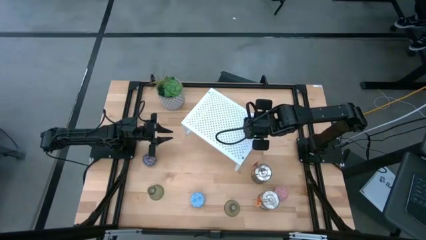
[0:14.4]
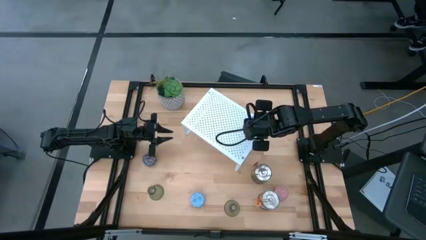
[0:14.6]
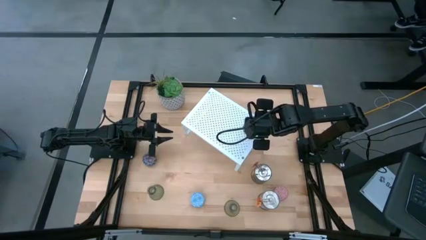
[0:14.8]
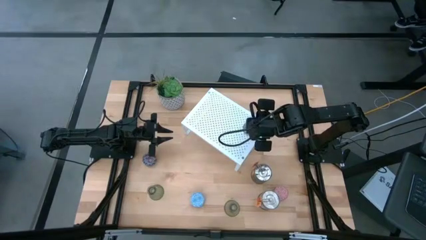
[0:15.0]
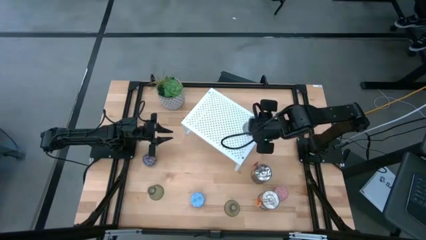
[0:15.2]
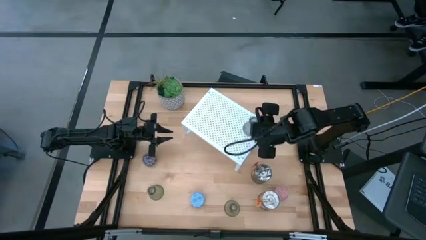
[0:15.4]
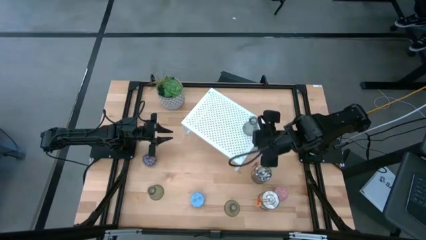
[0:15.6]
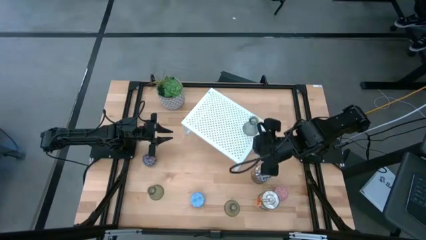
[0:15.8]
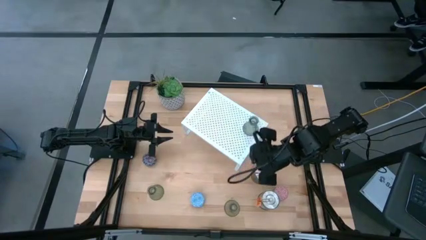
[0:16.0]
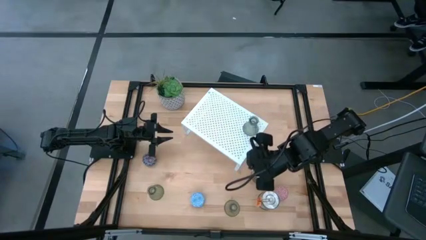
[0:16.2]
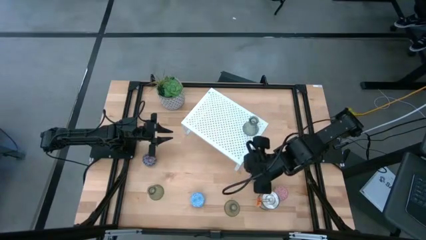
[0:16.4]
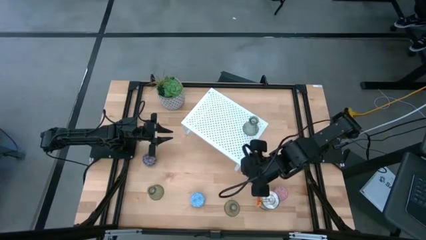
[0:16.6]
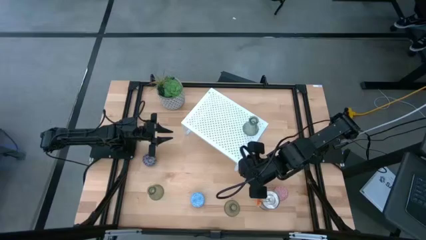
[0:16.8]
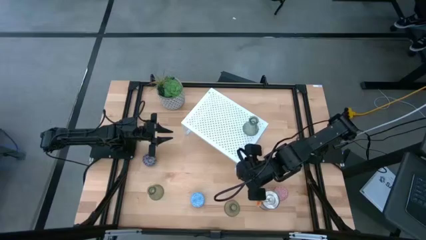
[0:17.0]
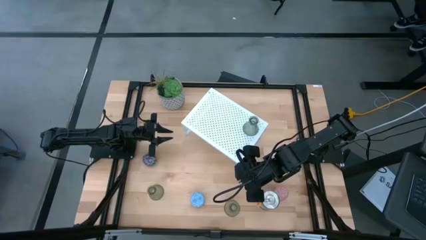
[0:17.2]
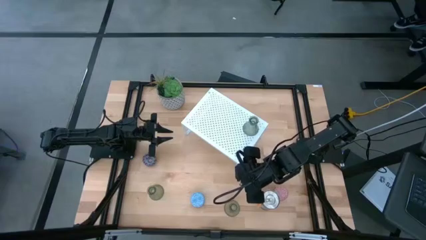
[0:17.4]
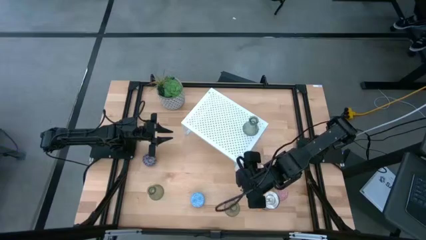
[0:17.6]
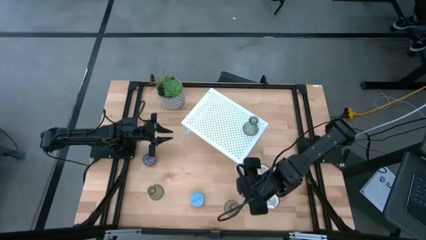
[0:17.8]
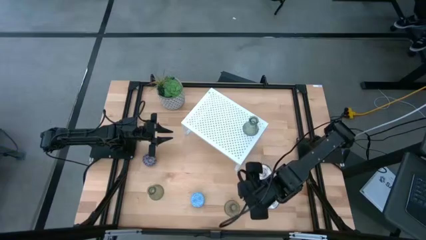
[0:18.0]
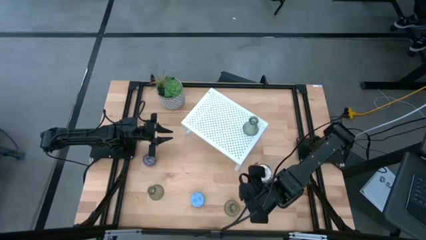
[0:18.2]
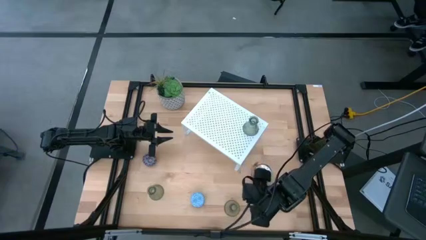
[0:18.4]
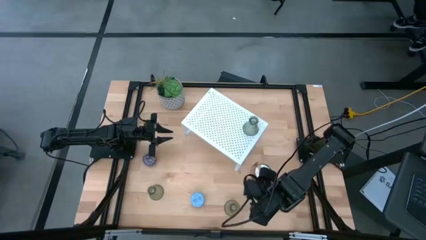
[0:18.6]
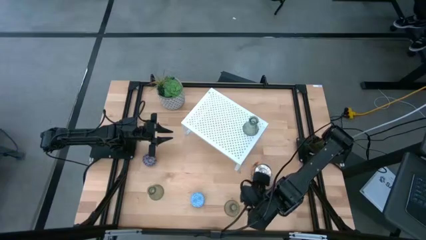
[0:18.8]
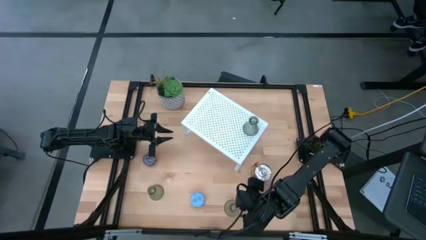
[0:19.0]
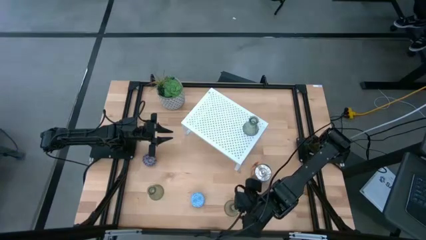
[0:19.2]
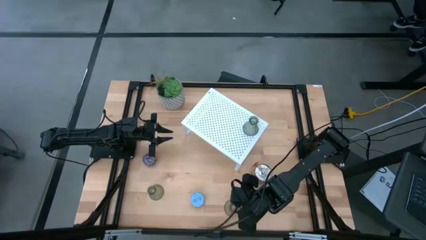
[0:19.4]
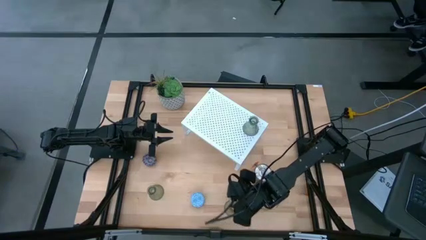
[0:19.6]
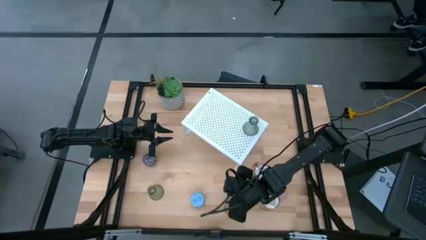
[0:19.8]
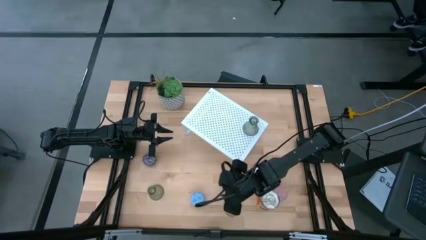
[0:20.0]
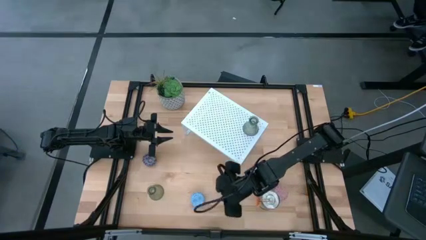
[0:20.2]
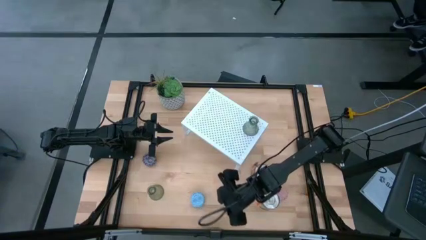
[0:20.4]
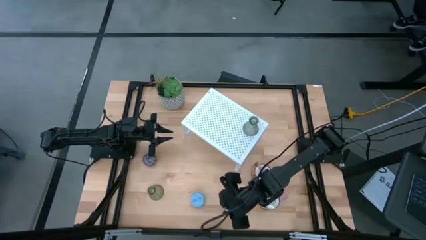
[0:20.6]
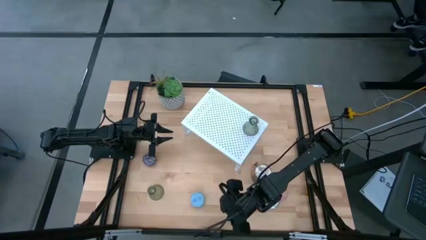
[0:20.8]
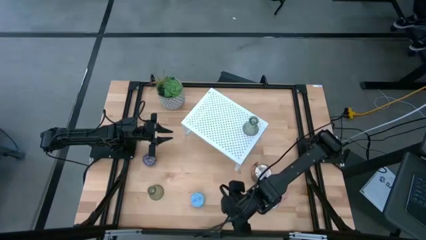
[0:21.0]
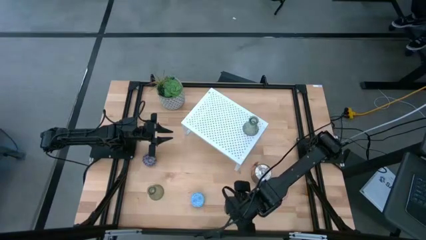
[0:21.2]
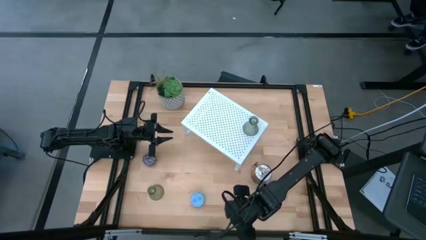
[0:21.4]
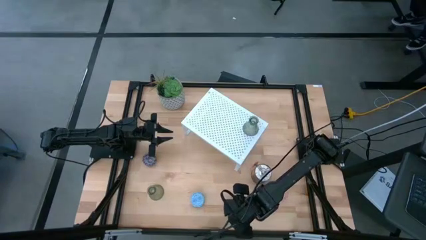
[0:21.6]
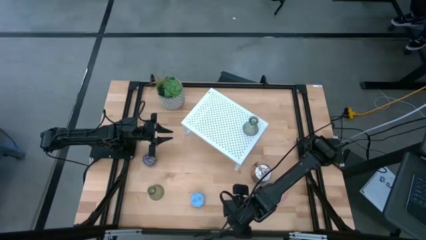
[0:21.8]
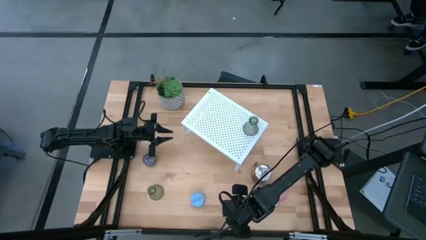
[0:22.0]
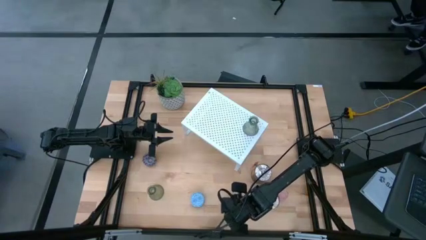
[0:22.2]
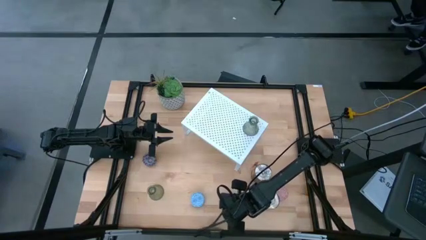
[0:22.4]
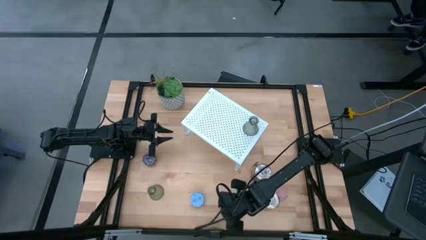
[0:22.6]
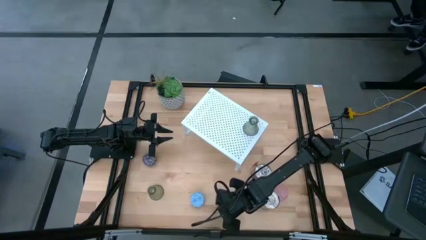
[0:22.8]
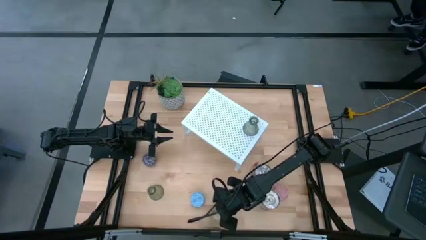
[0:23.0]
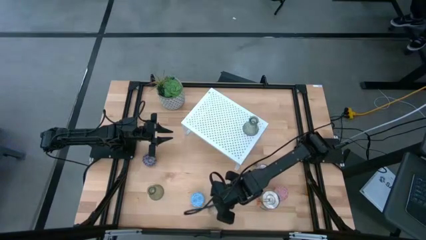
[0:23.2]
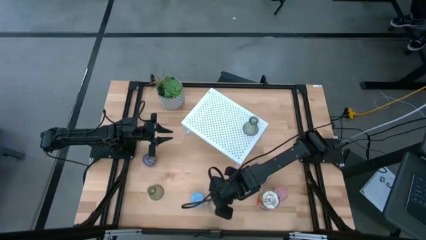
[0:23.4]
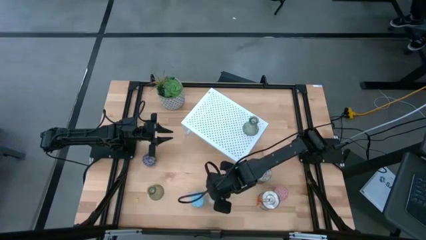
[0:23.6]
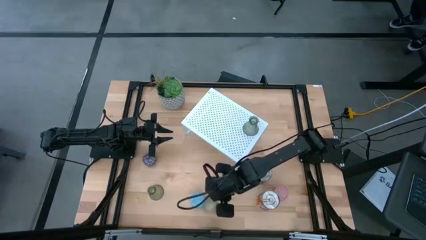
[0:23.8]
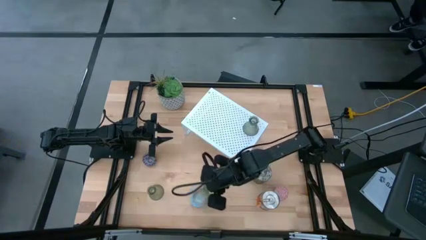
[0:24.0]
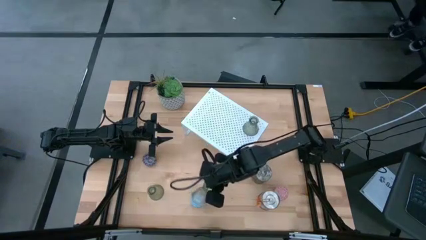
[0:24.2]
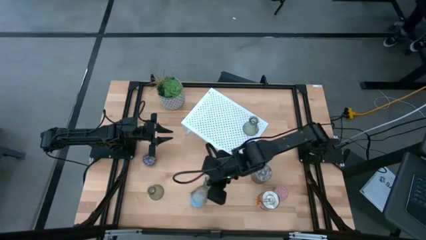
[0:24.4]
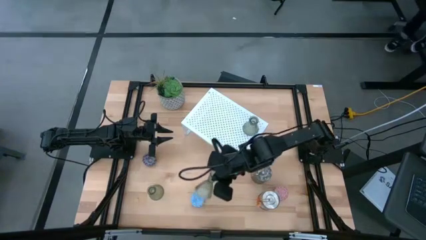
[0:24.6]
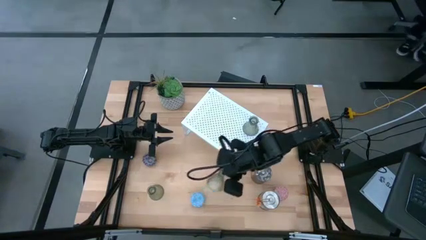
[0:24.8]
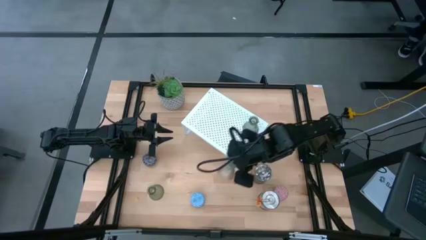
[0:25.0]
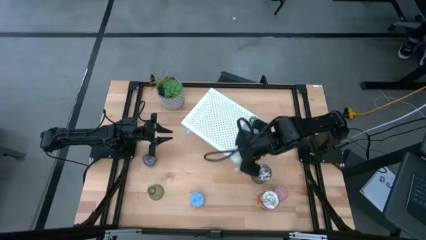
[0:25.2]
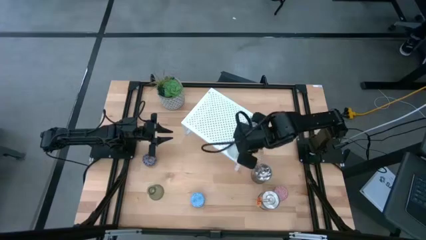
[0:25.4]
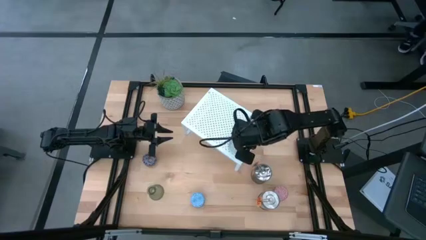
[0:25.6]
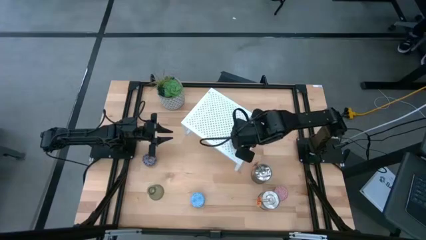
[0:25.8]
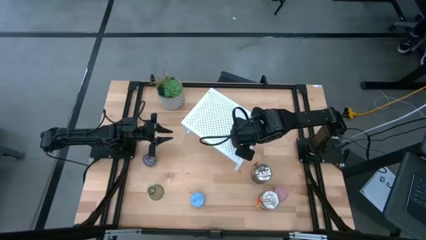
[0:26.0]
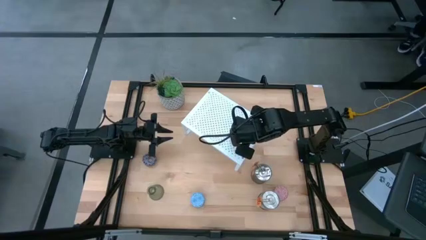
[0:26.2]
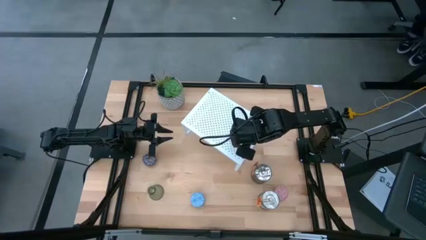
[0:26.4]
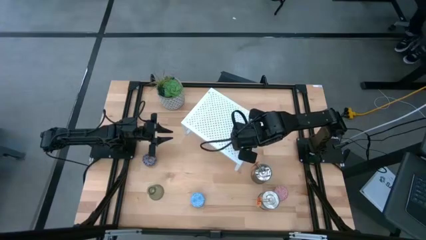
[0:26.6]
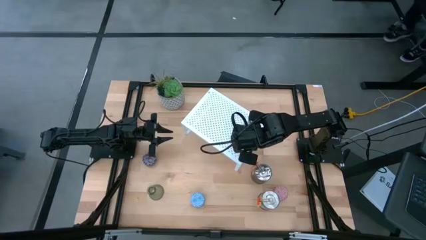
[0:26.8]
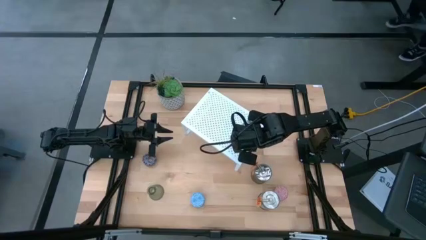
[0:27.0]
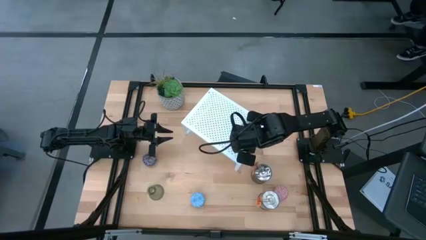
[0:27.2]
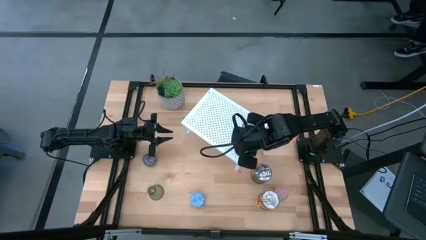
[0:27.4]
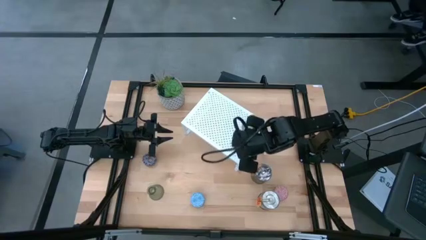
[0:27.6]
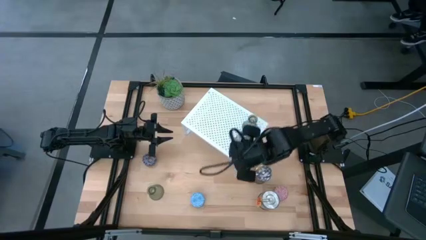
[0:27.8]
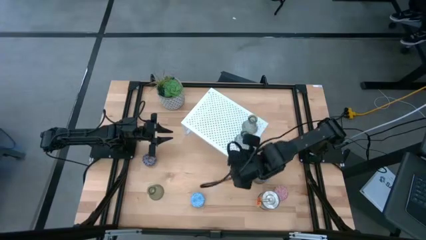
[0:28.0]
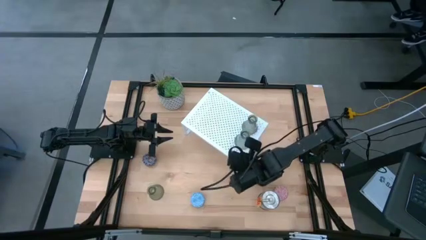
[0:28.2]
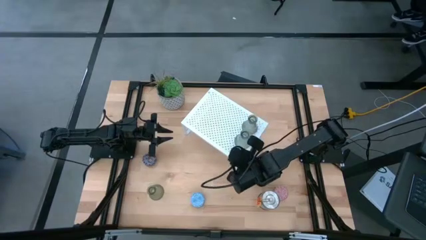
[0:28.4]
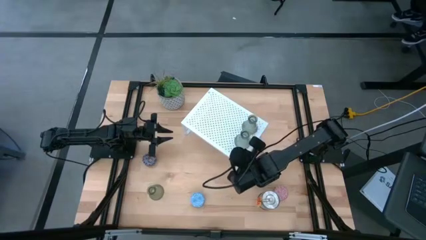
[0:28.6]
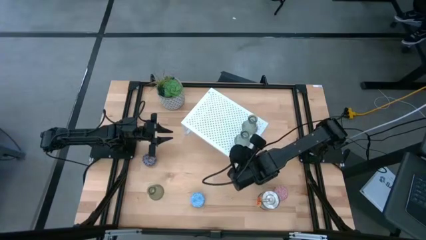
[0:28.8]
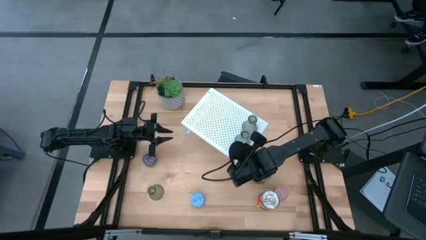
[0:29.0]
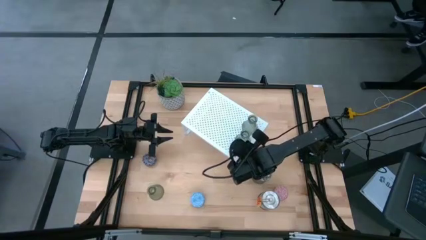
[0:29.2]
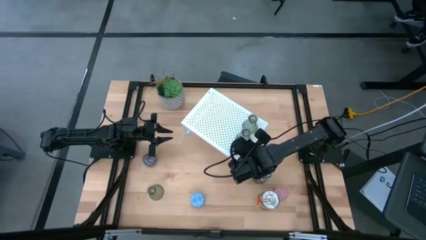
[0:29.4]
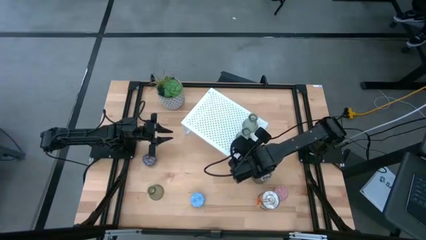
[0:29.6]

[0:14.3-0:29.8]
Task: Pick & Place candle stick holders
Put the right green vase on the shelf aligned with the other green vase
